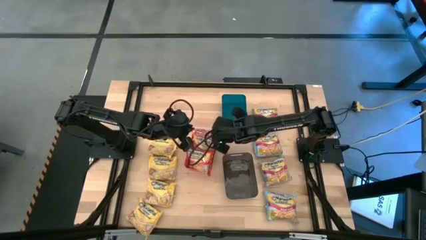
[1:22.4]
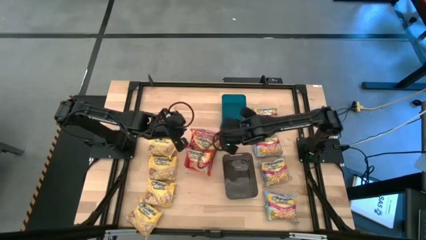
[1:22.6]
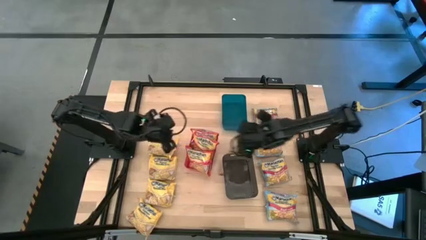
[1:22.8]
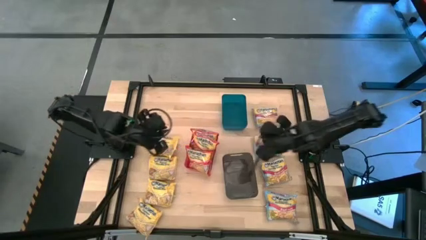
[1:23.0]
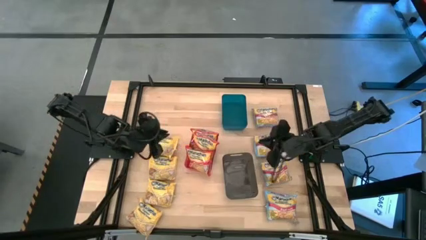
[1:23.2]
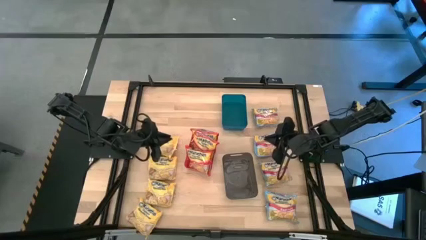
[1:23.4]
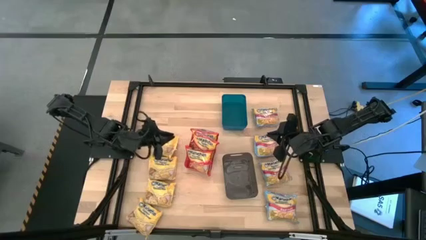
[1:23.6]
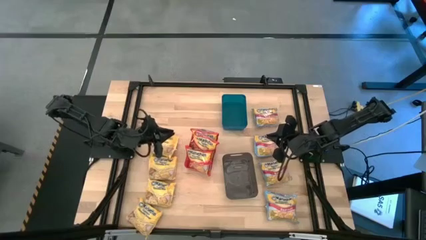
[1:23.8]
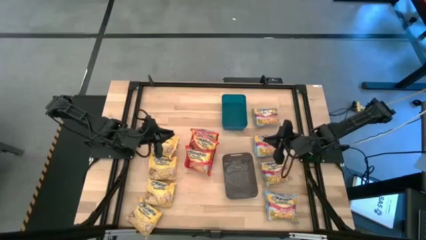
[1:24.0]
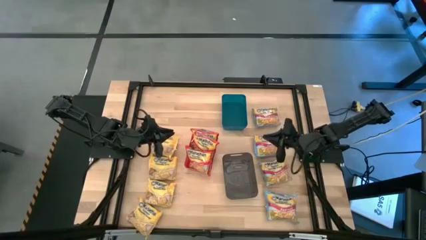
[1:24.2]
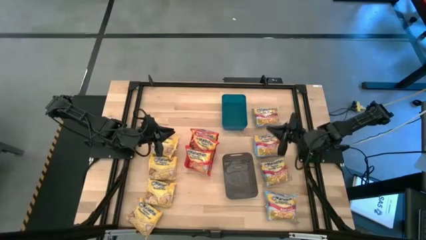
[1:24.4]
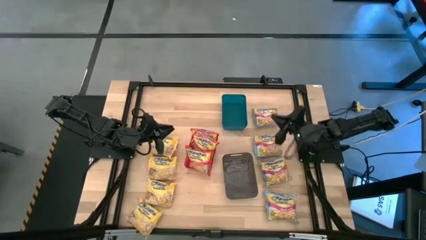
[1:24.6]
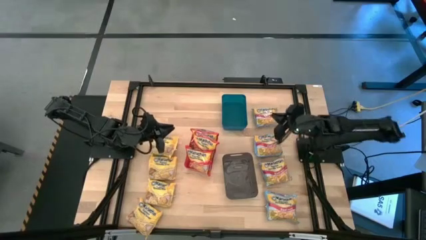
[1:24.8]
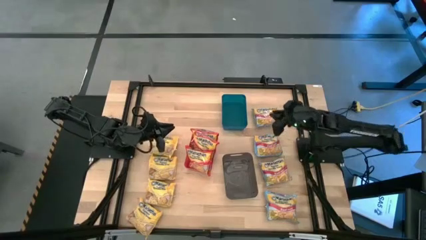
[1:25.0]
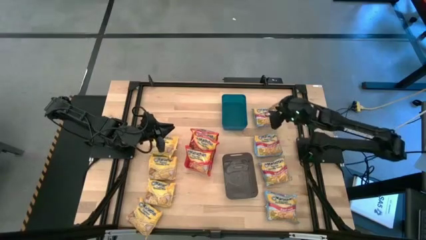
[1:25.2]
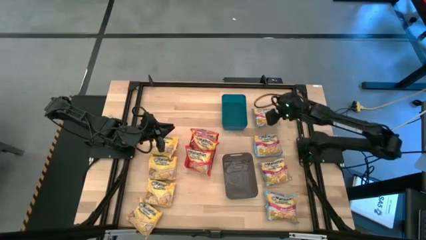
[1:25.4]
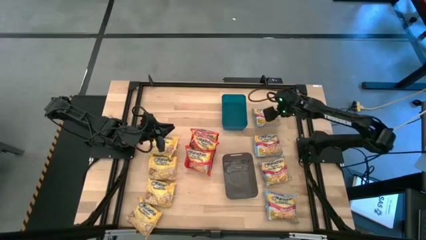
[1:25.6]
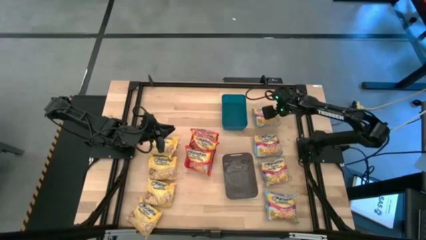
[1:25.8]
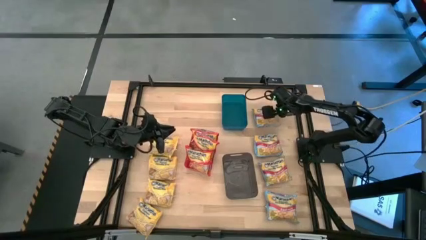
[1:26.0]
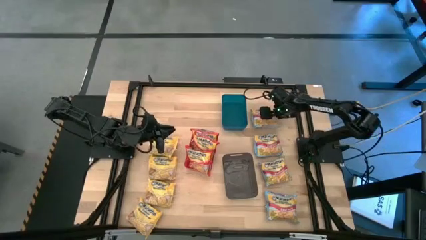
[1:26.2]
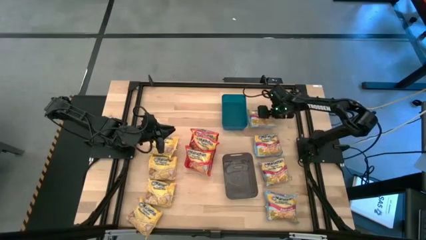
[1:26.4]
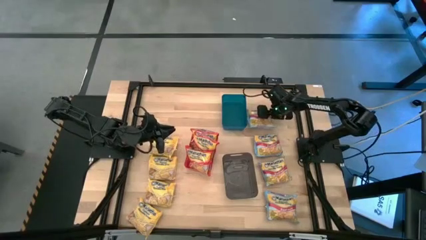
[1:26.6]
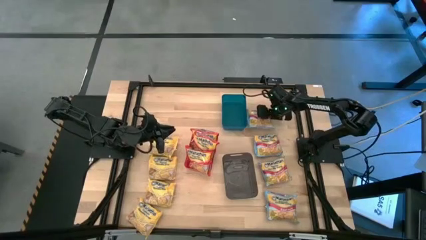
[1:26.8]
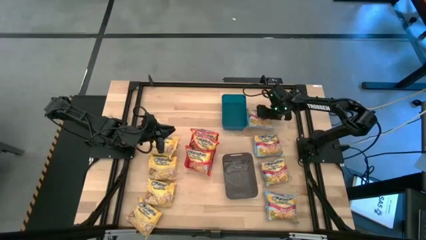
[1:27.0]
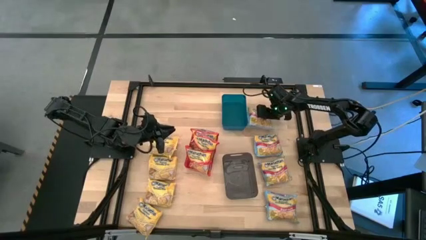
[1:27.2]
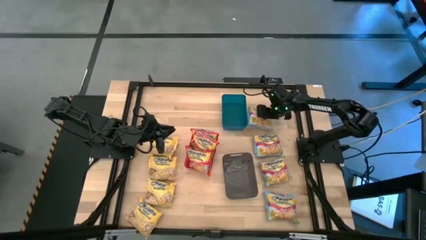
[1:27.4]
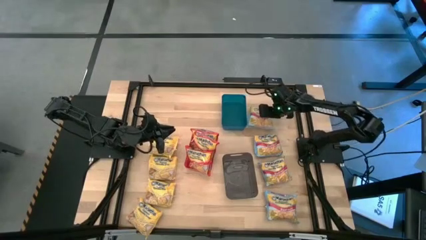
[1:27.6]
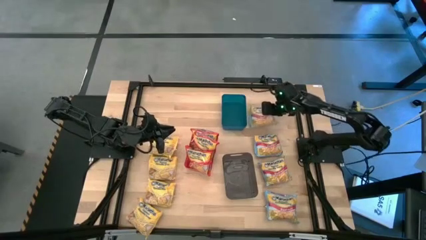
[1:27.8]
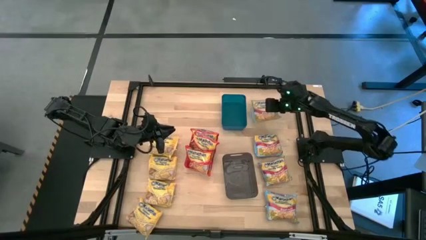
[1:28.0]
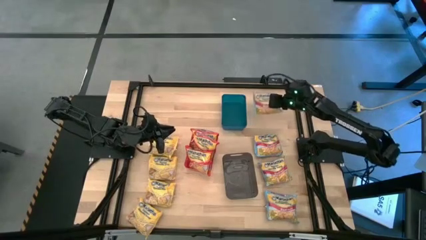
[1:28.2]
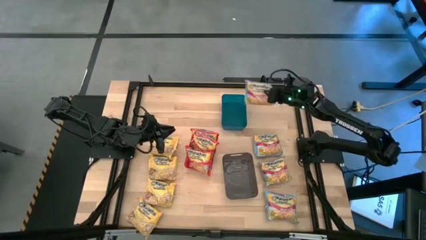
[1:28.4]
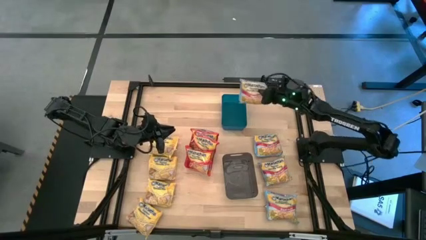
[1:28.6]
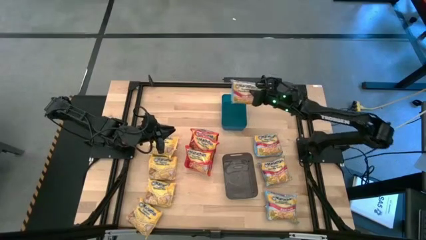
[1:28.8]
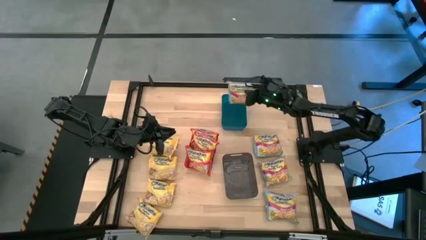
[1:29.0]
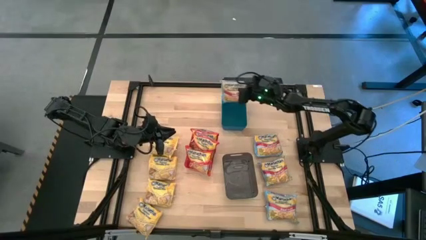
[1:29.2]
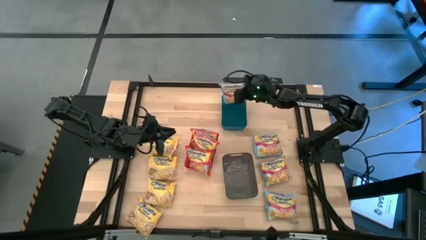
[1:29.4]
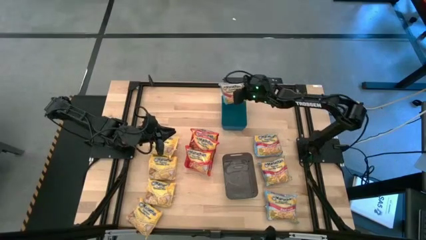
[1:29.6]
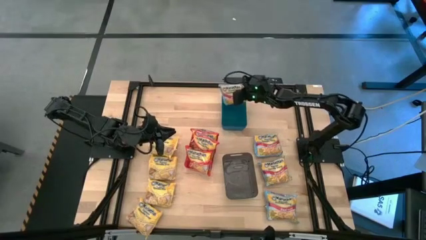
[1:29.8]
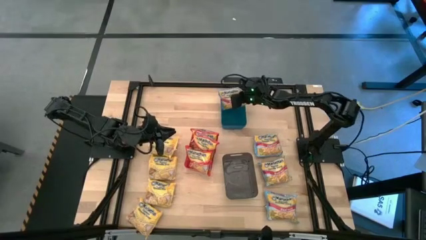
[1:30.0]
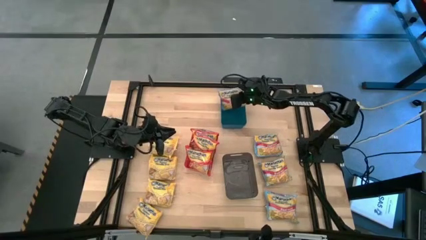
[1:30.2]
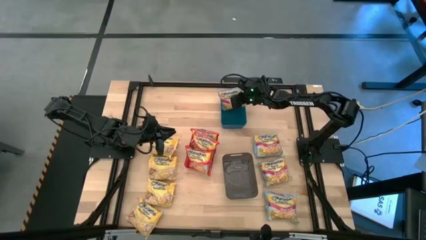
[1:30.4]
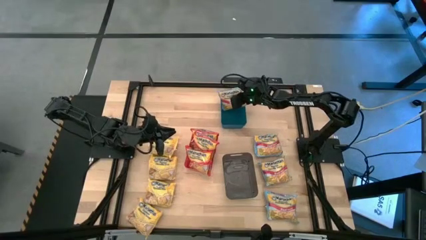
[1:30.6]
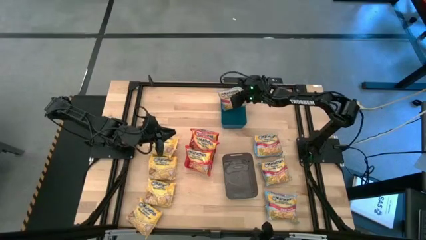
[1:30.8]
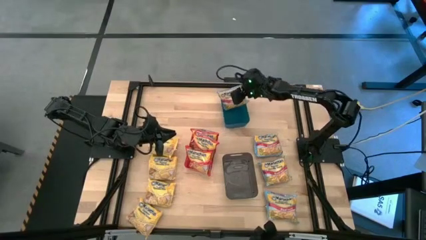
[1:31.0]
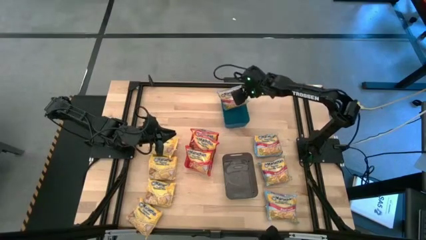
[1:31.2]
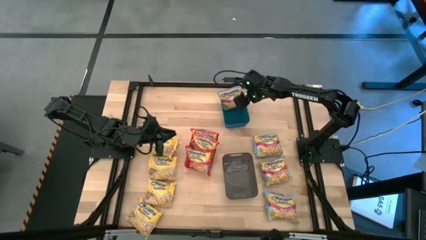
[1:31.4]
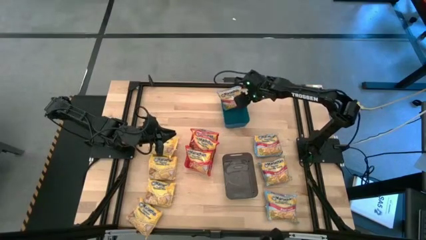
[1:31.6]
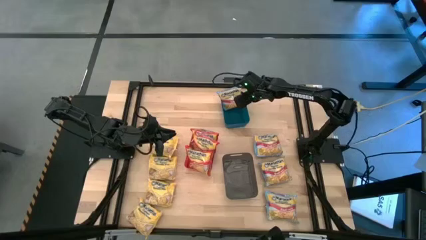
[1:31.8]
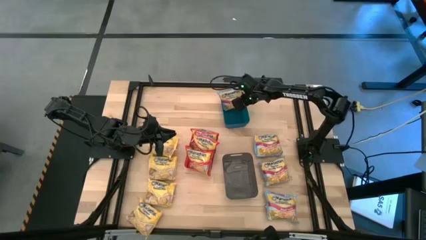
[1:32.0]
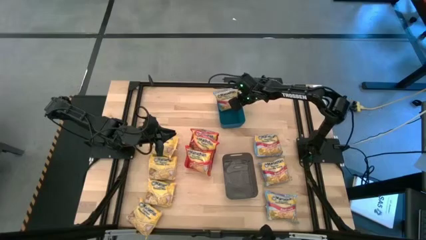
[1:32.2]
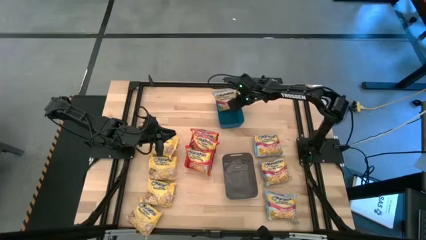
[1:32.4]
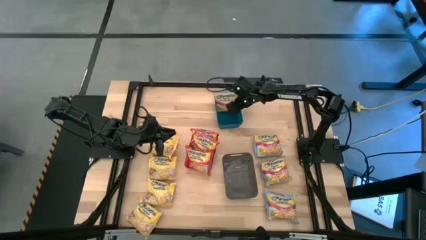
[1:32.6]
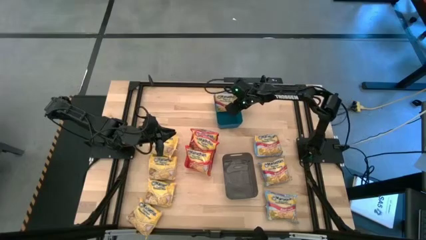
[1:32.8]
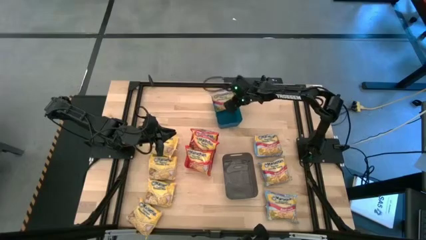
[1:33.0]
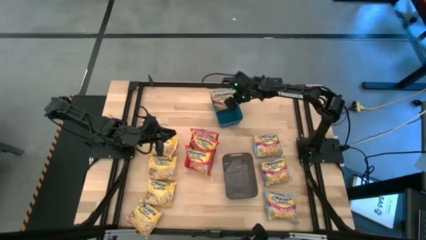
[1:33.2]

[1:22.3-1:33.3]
Task: Sort Maruchan noodles
Put the blue bag into the blue bin

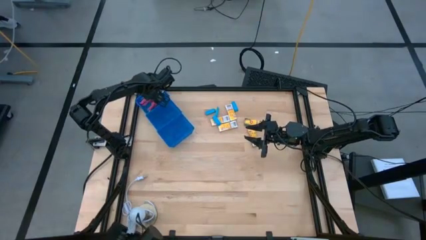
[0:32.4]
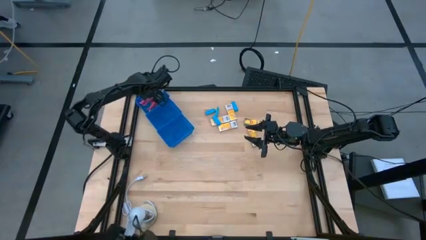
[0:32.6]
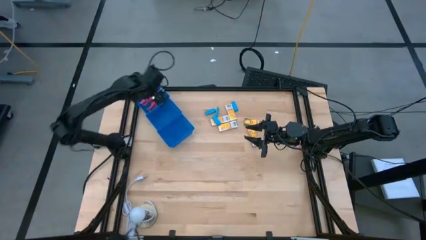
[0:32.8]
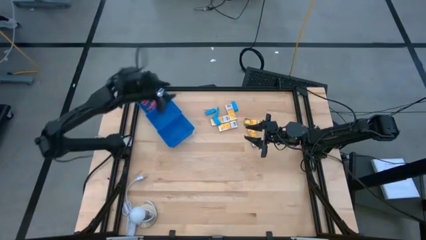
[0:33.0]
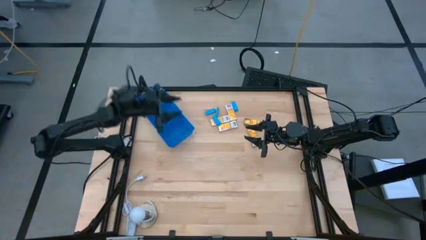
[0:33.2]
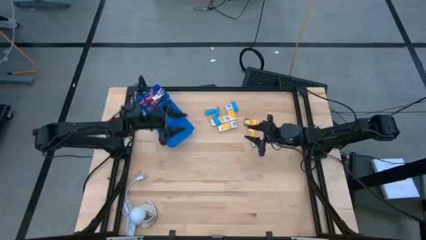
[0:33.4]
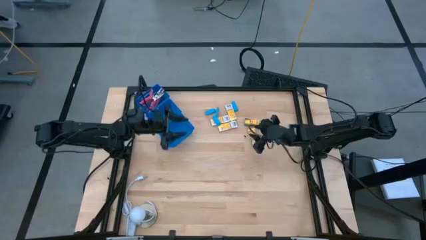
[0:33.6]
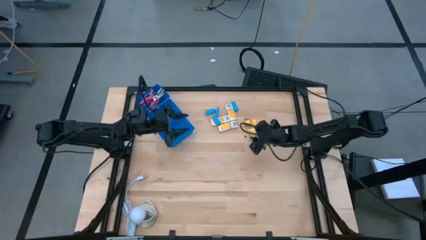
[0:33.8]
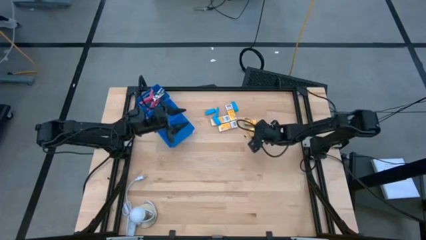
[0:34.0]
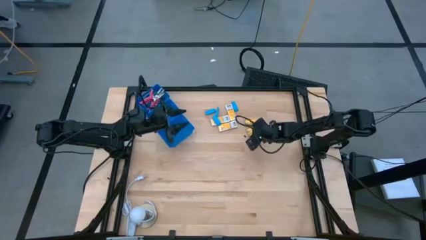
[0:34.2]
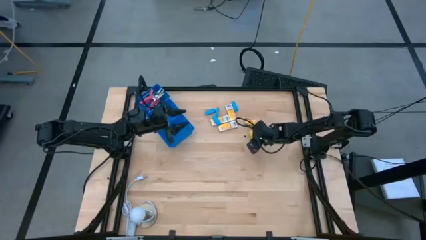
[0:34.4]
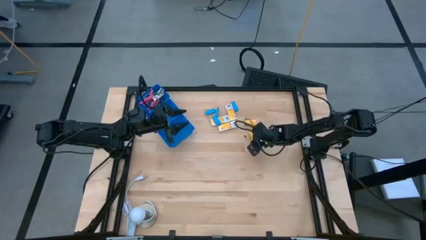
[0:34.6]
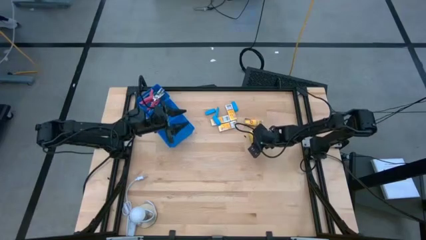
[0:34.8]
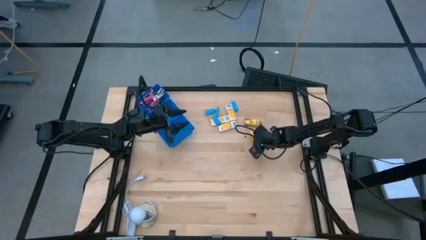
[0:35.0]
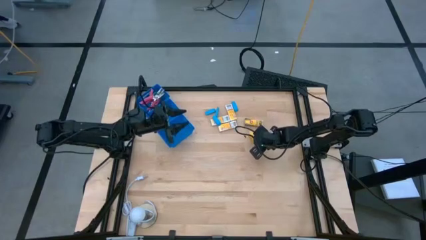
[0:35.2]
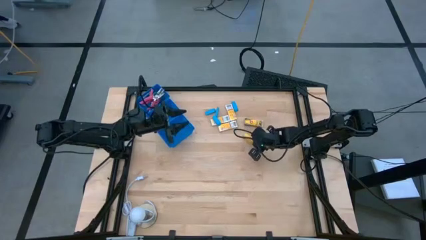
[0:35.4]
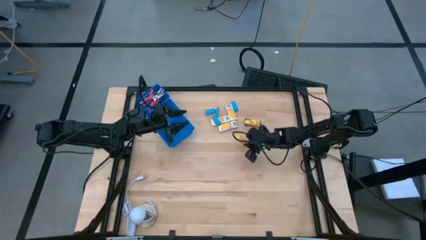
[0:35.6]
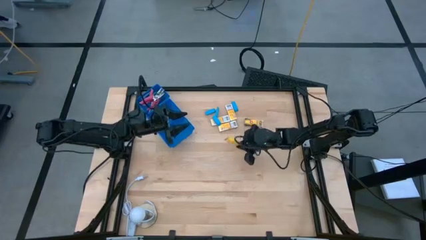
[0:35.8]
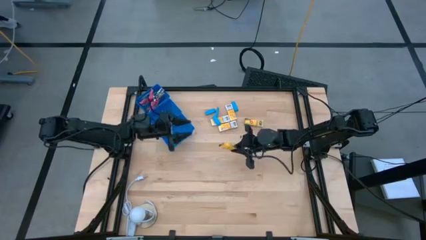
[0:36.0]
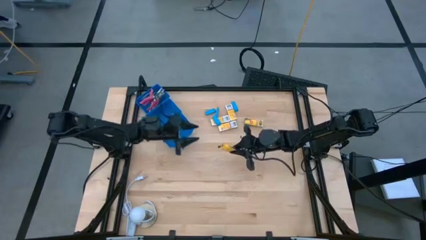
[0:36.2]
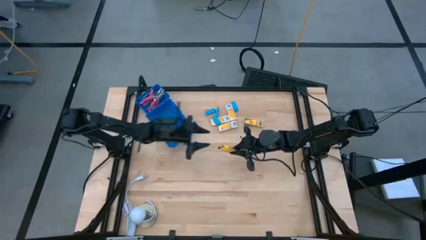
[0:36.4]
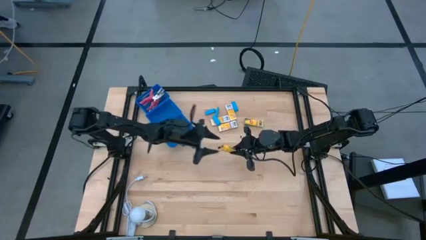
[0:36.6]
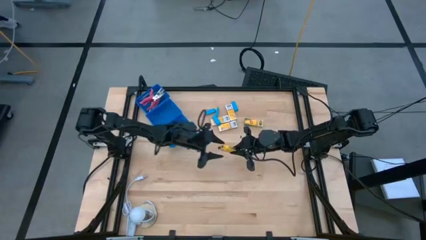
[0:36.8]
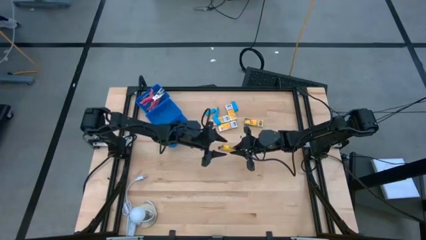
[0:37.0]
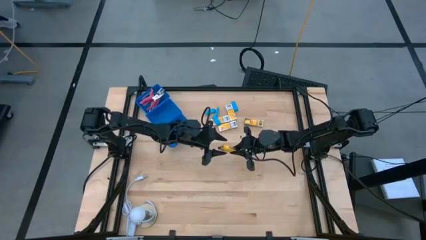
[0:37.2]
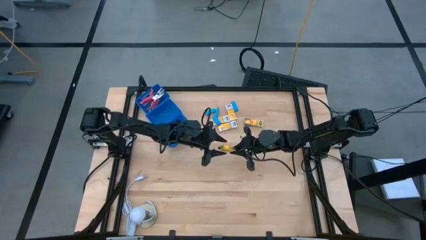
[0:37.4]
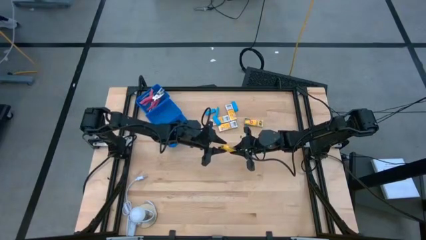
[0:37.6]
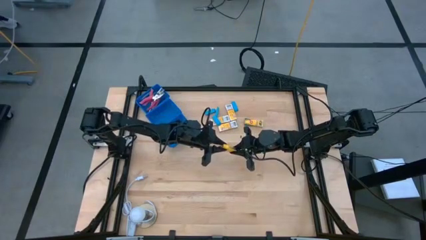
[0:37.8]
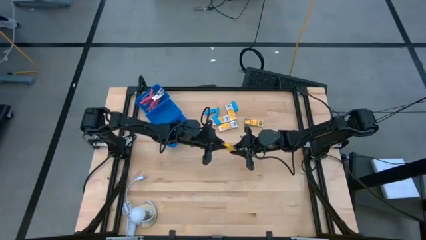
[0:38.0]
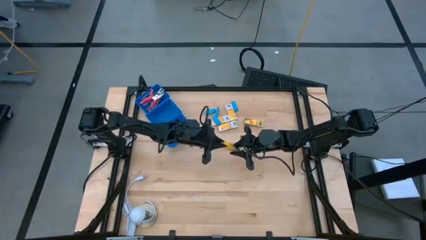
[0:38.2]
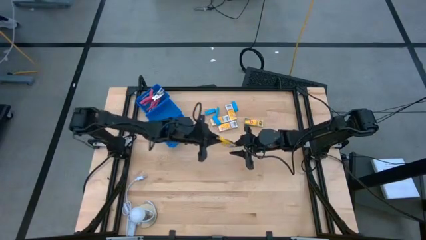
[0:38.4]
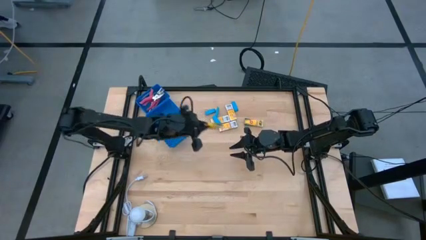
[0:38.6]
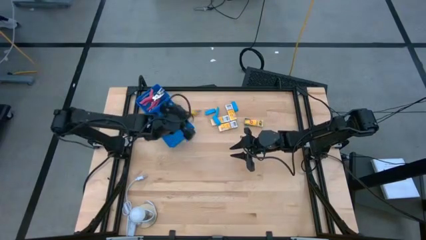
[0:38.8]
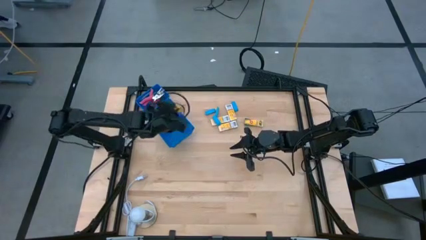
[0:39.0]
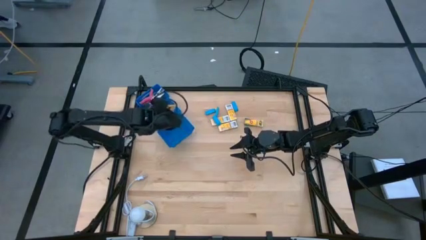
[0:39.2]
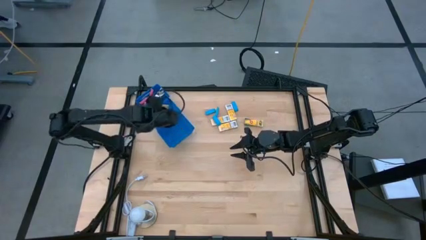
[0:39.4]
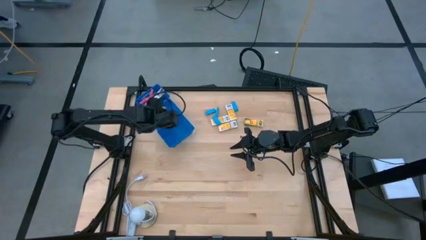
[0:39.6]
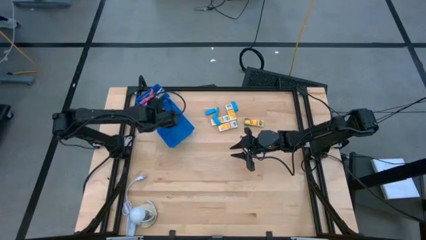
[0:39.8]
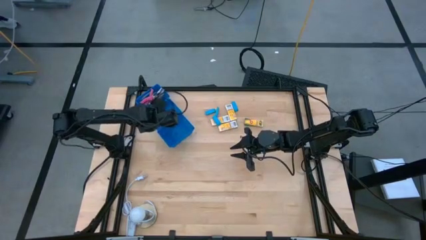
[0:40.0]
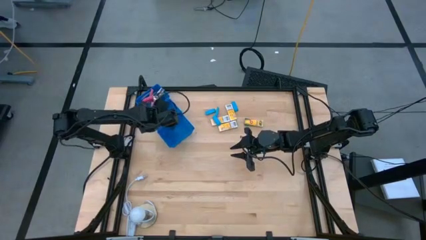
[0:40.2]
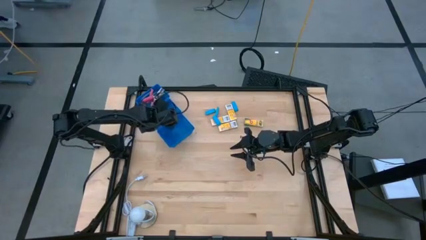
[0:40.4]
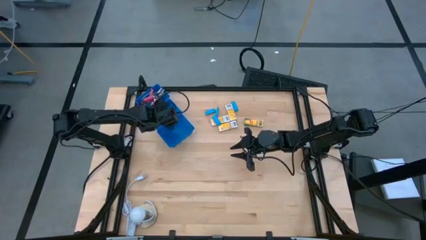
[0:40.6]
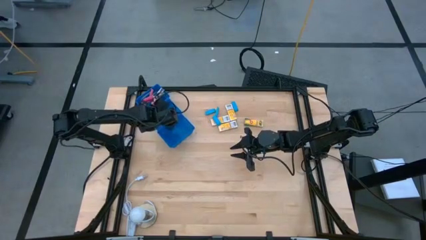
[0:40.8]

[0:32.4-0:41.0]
Task: Pick & Place School Supplies
Put the yellow crayon box into the middle blue bin
